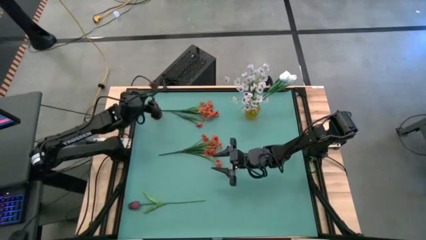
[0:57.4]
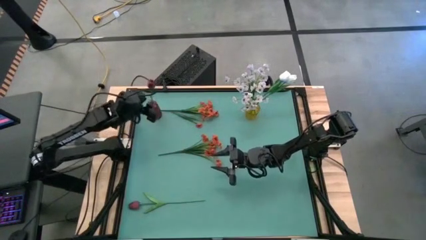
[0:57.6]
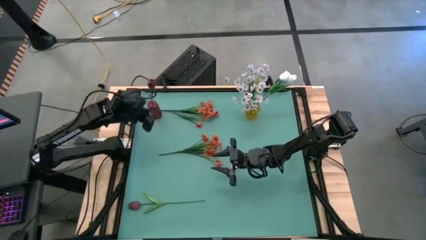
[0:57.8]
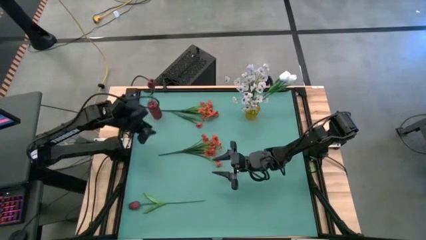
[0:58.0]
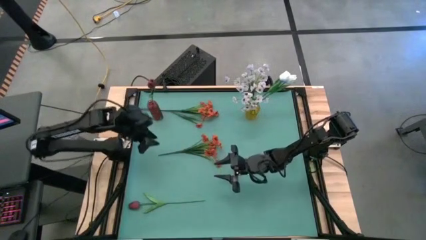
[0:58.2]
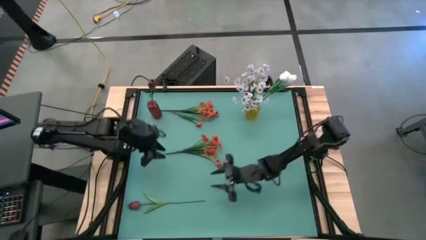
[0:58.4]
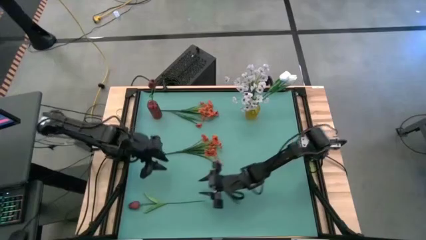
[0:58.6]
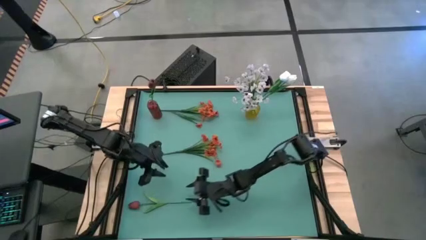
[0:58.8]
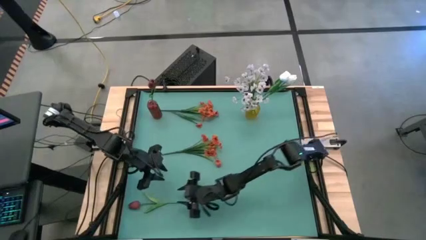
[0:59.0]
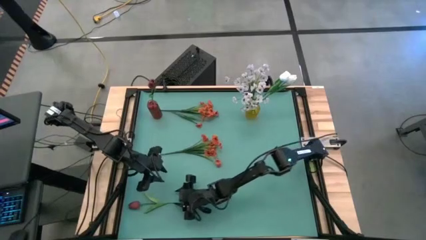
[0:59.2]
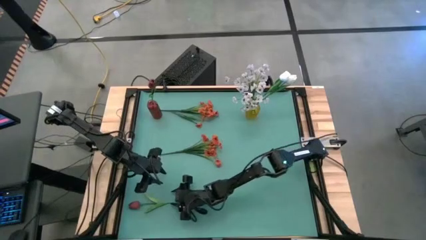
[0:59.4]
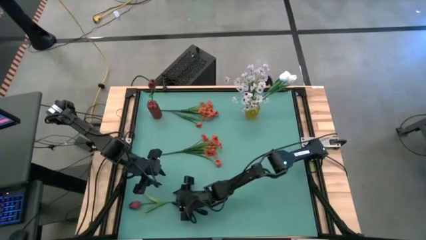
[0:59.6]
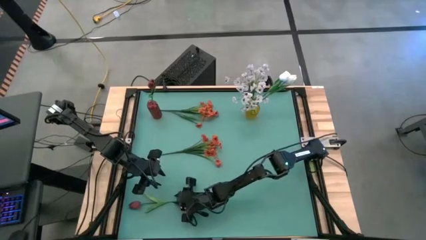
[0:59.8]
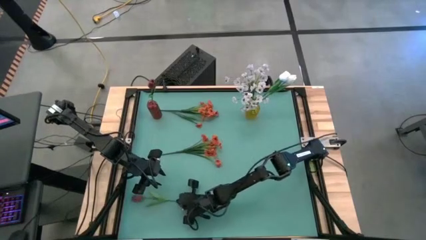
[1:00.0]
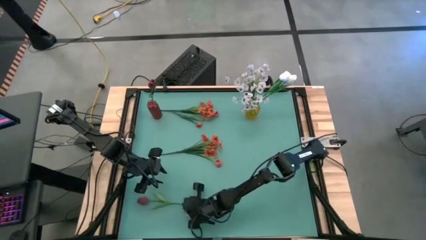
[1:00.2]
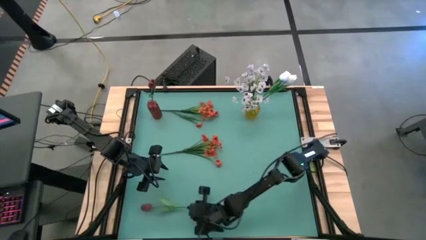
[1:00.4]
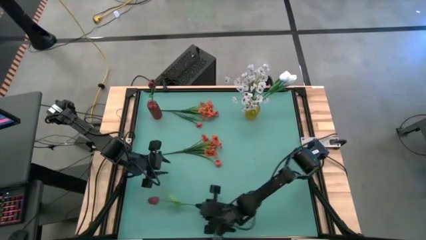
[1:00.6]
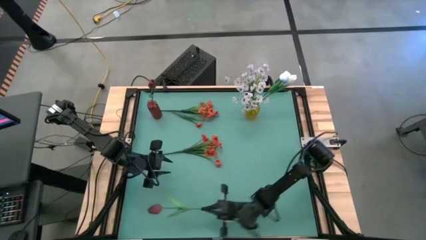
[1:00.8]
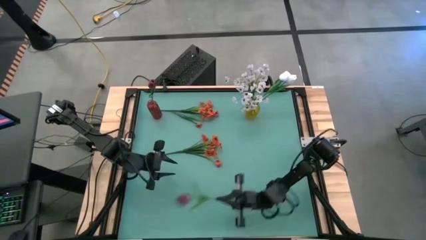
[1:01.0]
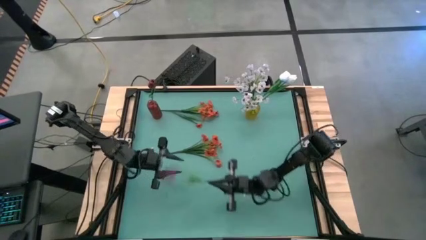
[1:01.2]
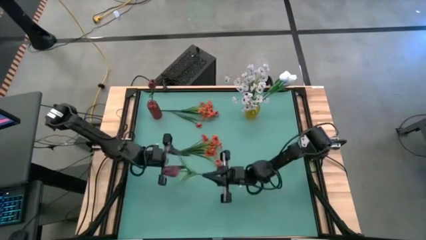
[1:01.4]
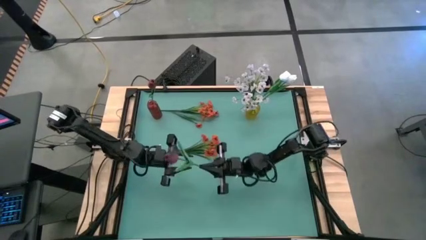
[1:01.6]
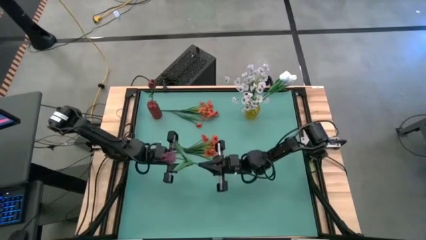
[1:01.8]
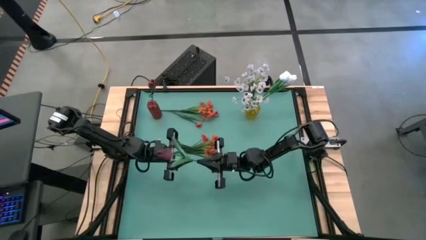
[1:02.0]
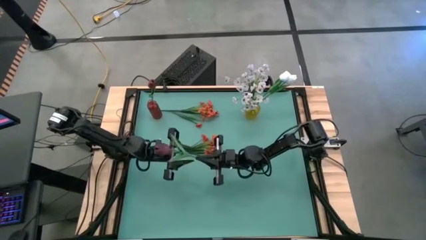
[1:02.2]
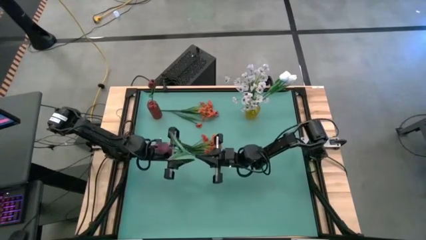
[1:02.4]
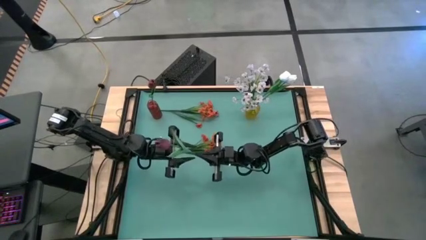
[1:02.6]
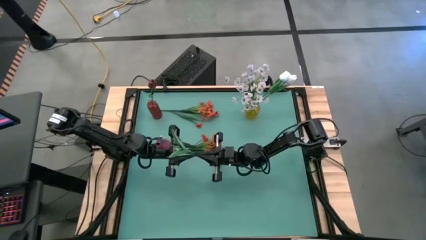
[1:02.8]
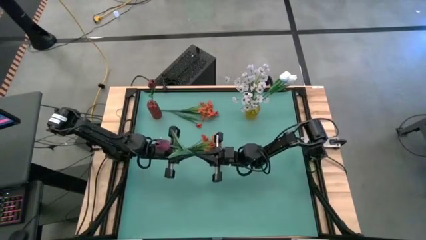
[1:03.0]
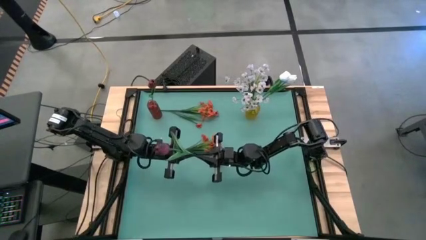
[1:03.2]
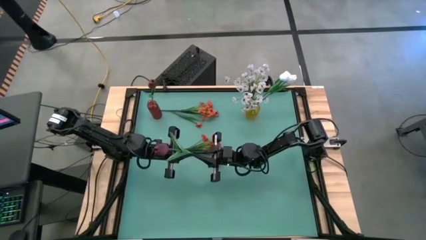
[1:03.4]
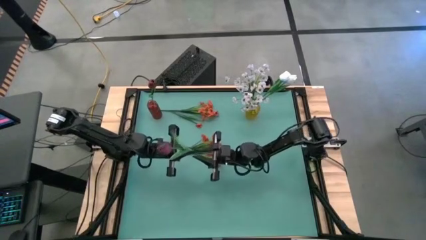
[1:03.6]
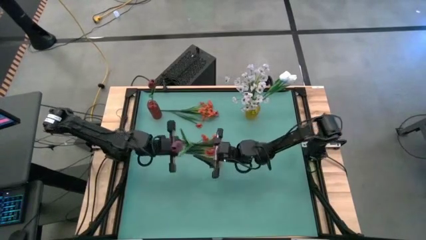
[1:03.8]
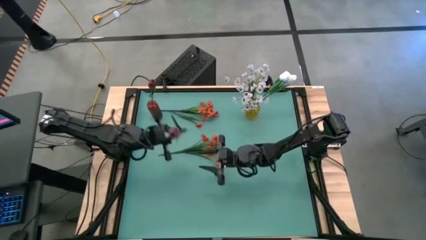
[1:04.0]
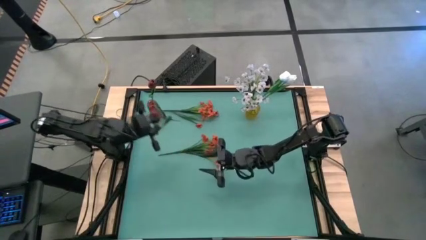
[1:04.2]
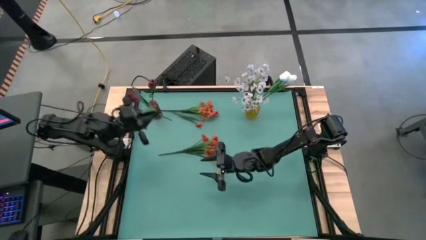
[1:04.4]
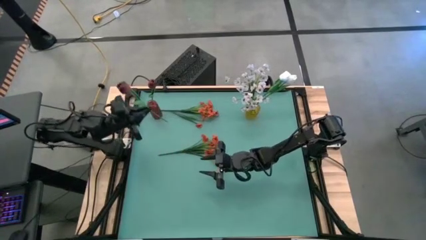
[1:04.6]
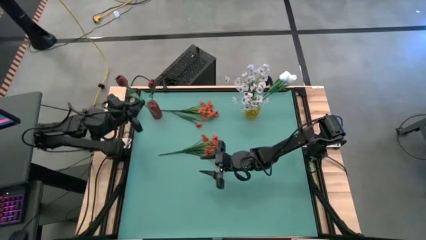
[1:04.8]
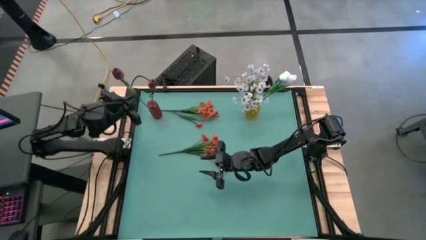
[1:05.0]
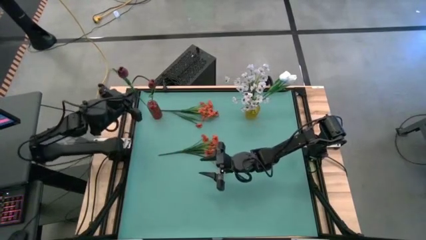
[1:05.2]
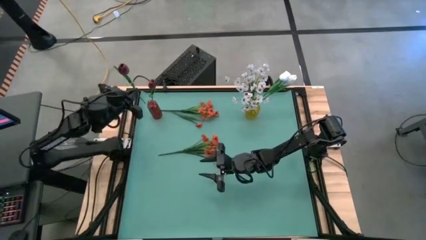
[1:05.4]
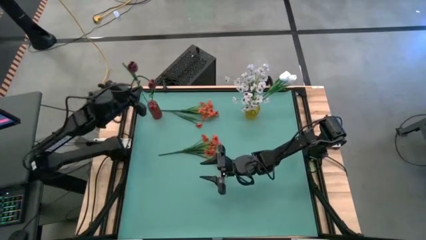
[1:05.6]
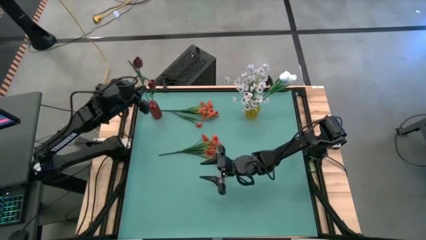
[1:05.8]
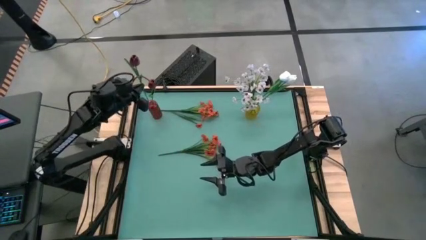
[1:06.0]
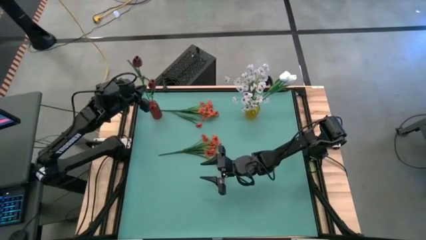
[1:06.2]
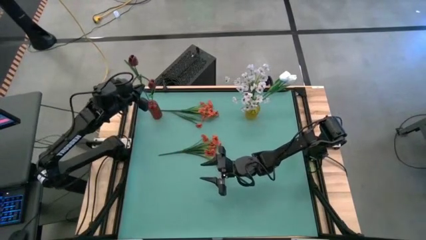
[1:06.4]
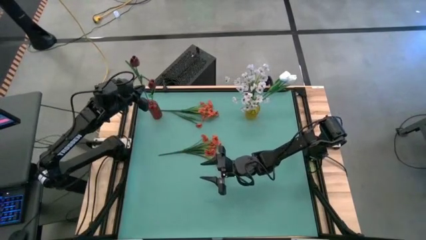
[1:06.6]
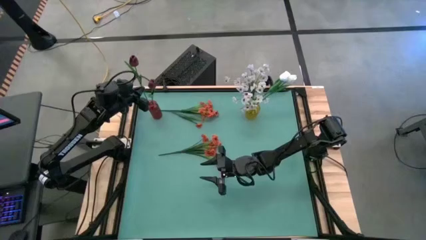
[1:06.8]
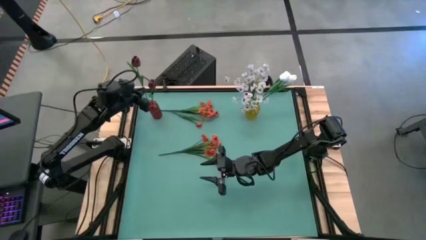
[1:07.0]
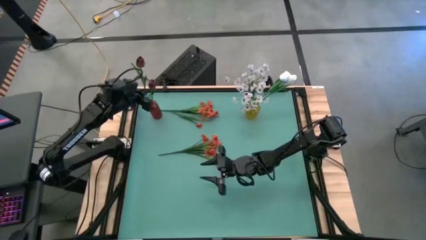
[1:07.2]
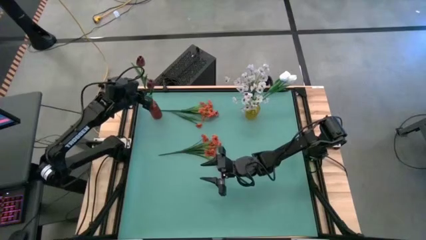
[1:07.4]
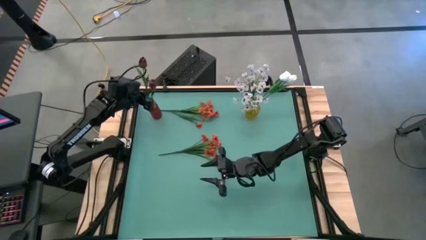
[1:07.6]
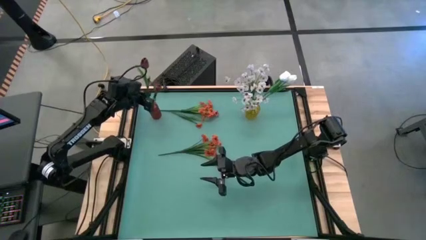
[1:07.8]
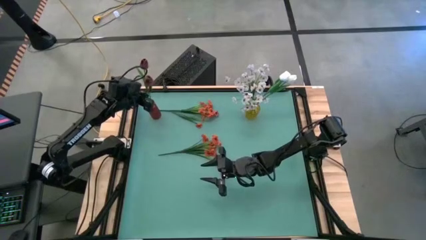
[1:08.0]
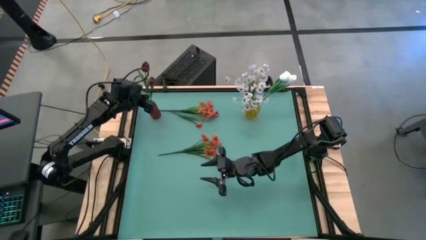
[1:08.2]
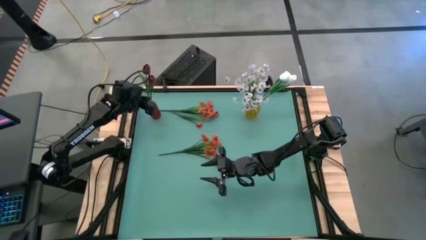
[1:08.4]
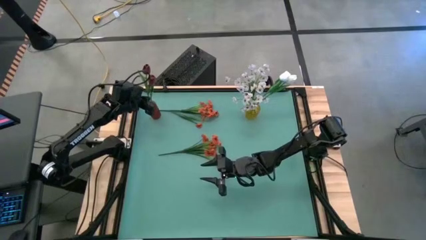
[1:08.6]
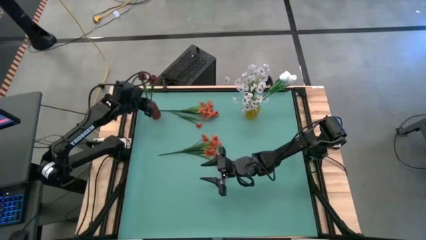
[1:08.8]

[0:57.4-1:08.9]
Task: Sort flowers into vase by color
Put the red tulip into the red vase

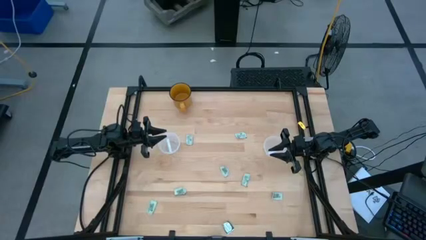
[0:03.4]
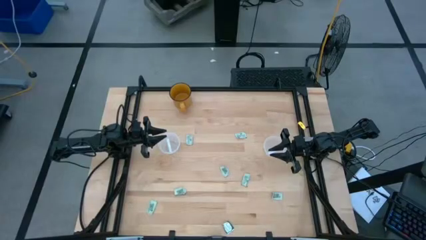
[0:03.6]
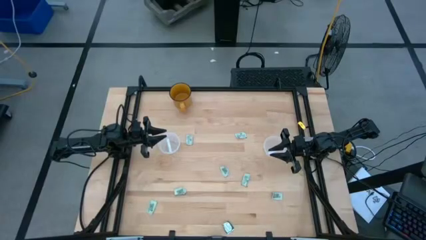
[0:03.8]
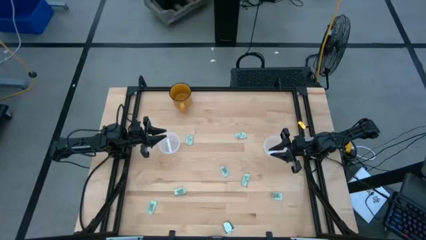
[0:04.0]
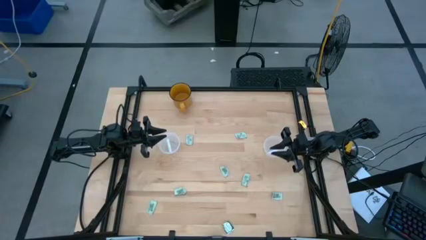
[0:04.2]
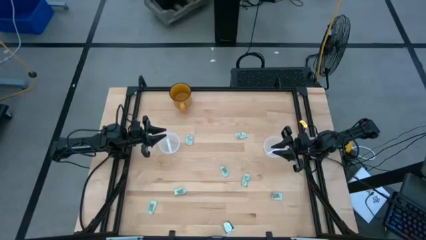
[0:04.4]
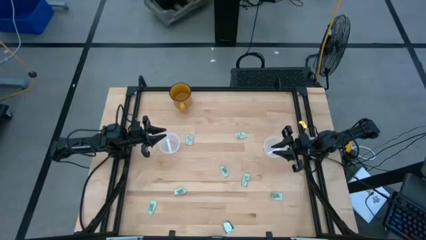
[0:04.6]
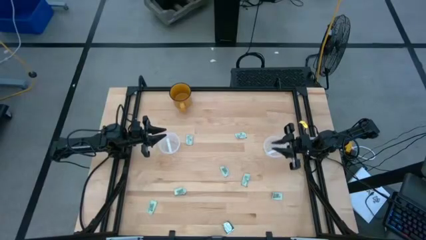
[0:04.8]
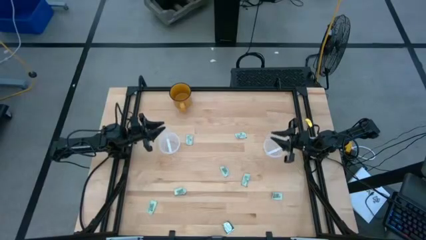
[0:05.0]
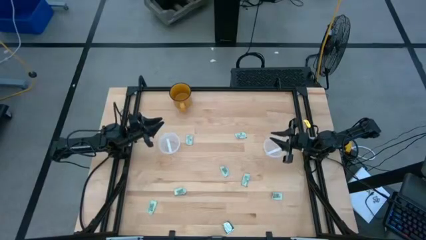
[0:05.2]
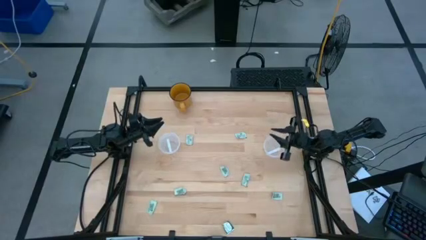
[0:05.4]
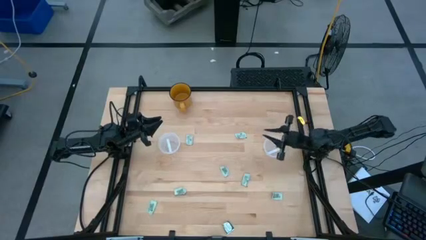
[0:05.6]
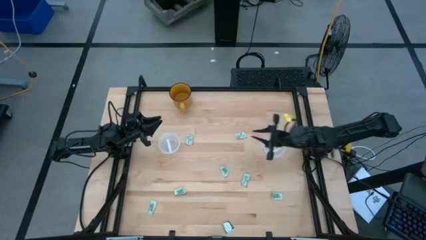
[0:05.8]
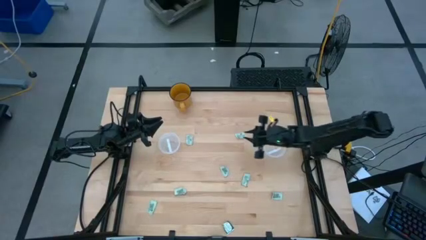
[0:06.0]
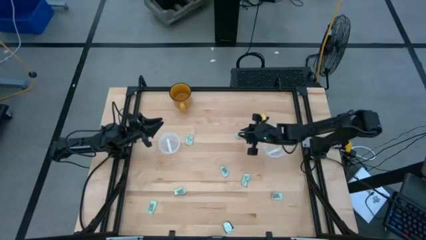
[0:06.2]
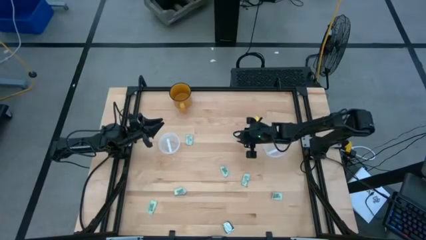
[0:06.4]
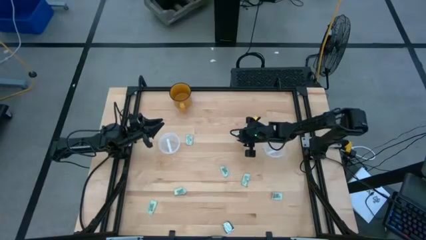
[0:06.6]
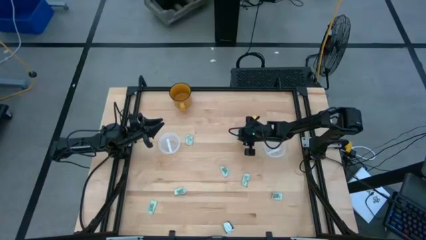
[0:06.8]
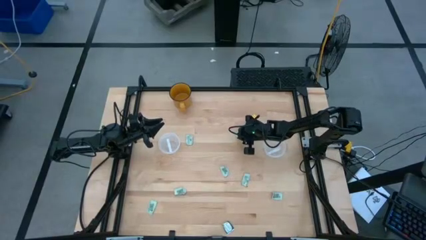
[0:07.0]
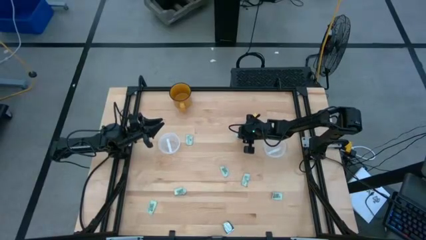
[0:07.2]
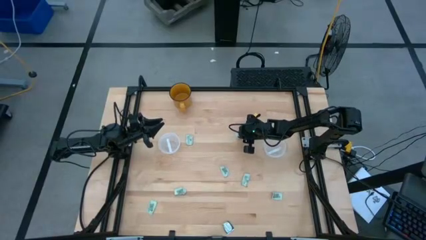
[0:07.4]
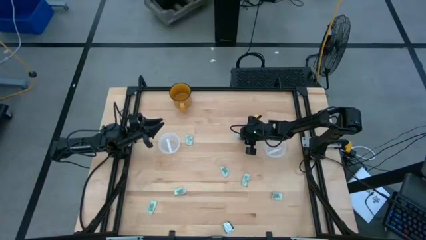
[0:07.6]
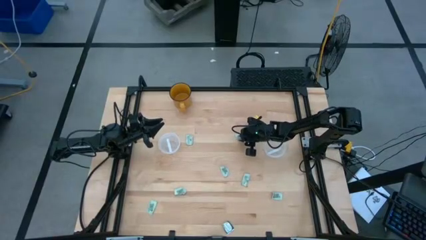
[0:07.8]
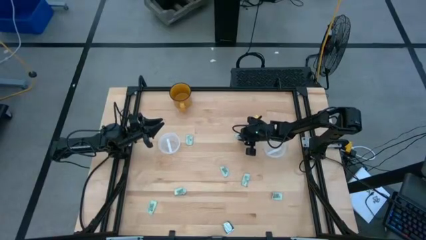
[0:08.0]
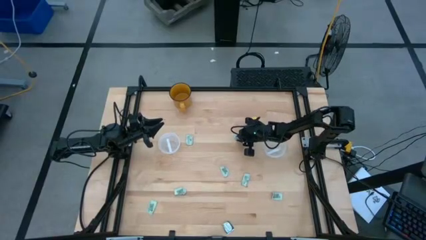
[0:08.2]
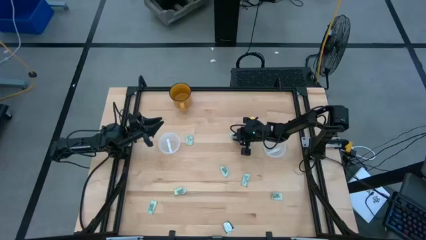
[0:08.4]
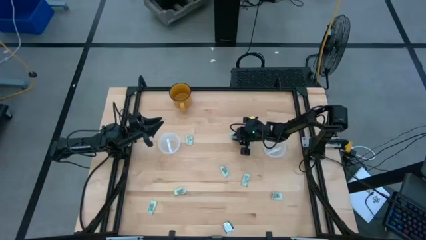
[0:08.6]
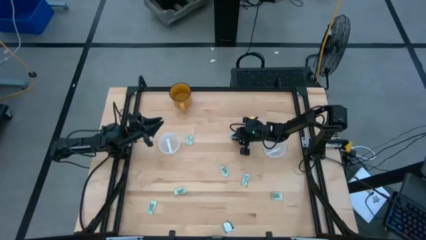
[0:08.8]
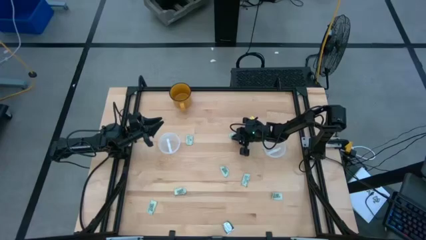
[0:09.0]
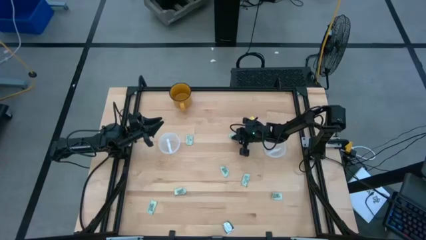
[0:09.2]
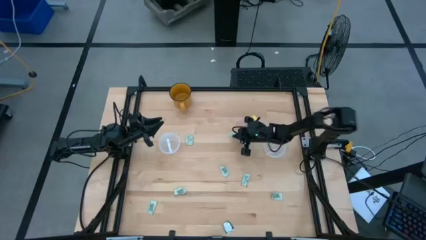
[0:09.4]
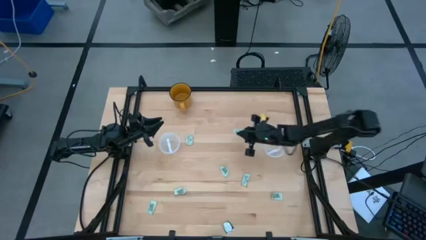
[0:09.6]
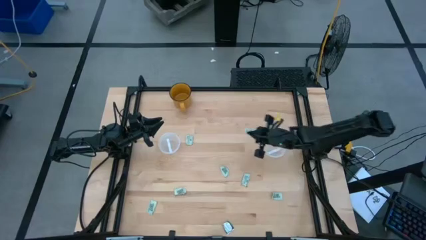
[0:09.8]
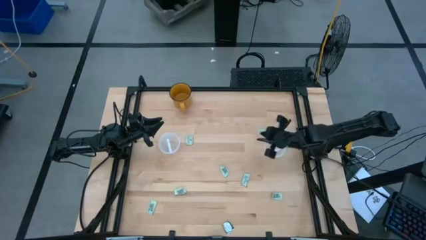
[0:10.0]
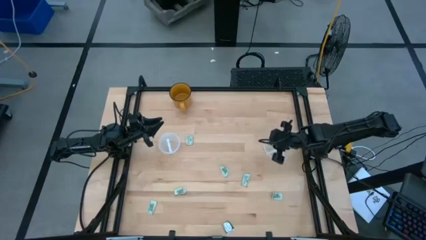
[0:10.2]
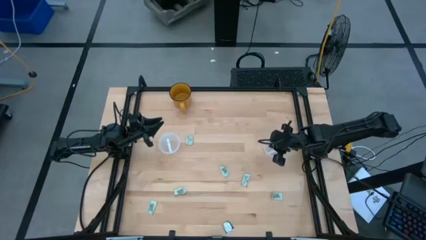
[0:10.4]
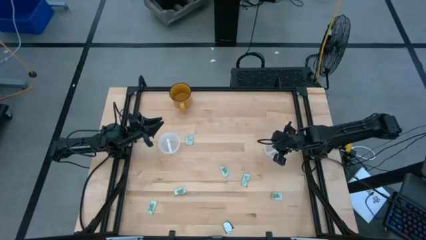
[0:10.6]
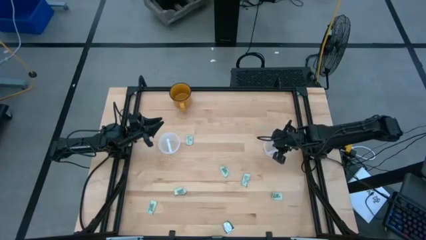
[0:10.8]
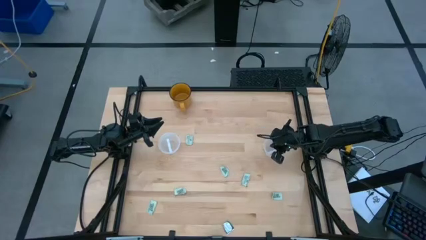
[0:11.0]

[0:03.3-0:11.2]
Task: Pick and place items into bin
Put the stevia packet into the right transparent bin
